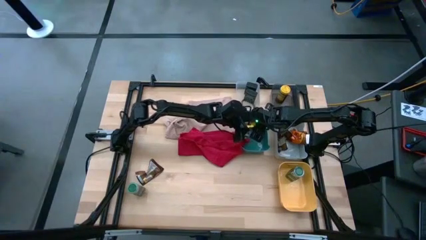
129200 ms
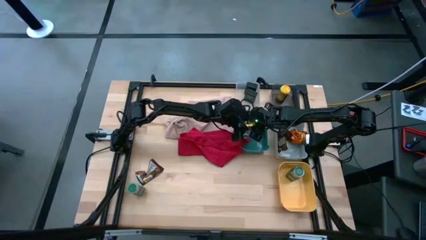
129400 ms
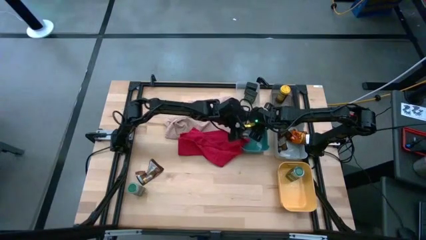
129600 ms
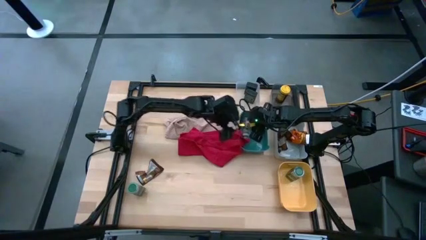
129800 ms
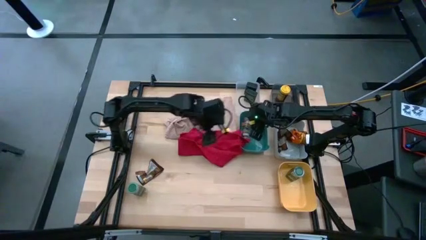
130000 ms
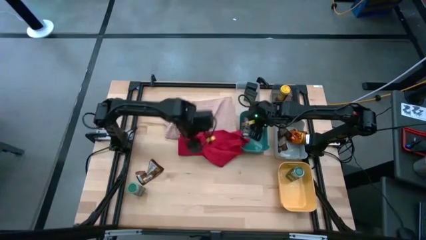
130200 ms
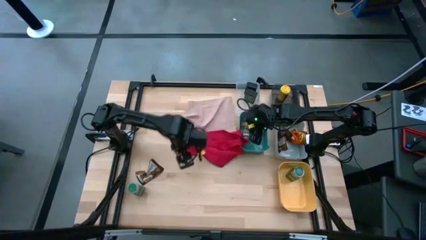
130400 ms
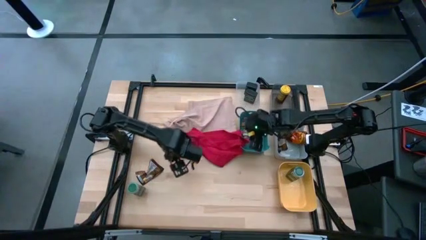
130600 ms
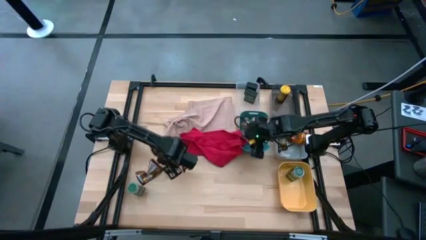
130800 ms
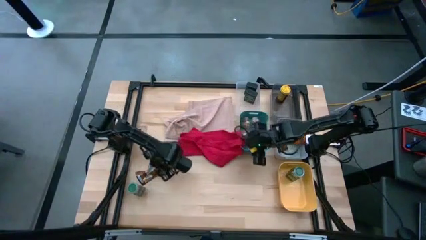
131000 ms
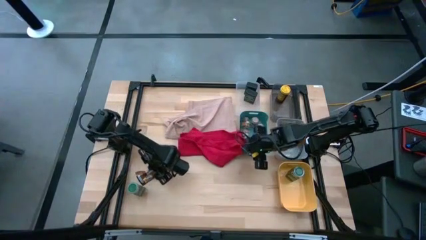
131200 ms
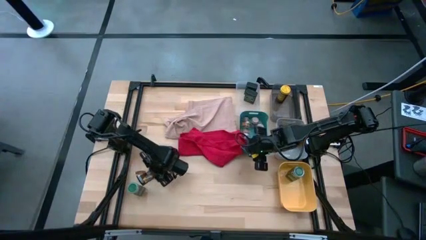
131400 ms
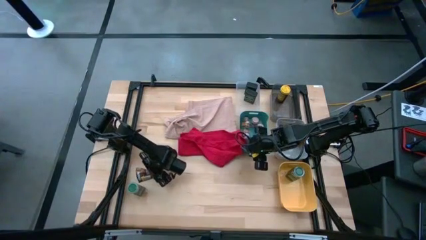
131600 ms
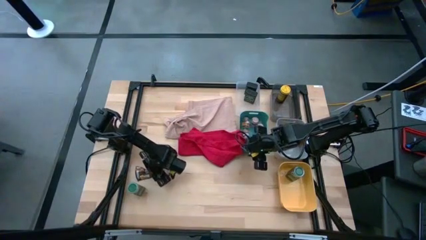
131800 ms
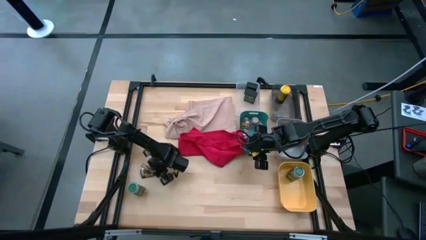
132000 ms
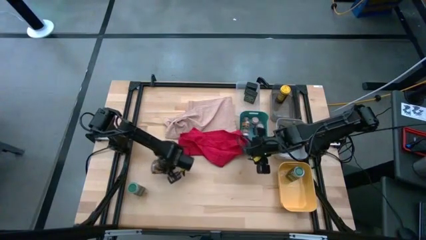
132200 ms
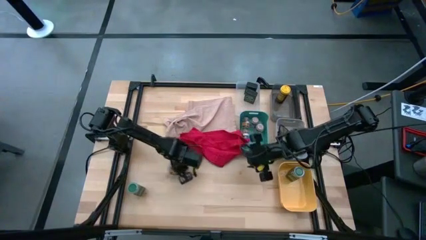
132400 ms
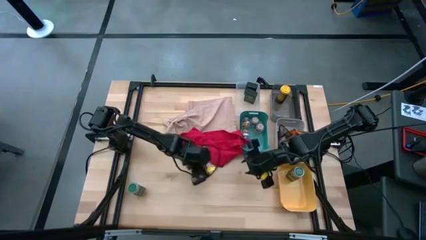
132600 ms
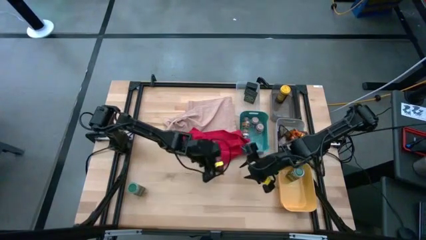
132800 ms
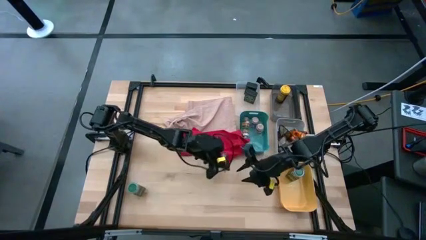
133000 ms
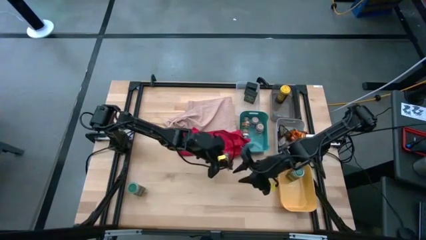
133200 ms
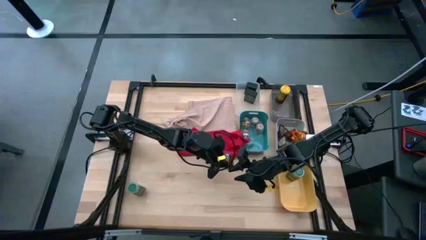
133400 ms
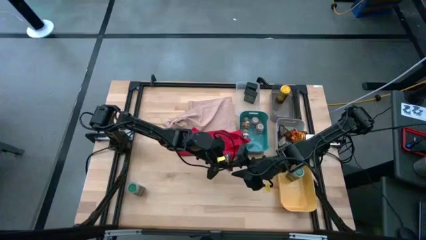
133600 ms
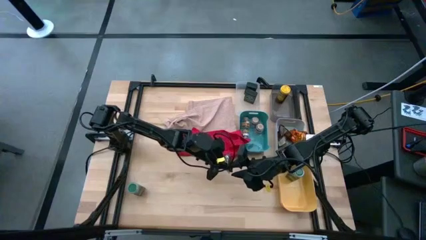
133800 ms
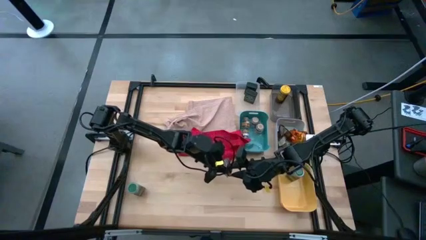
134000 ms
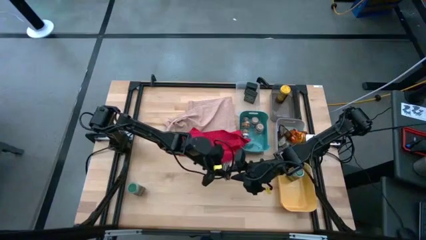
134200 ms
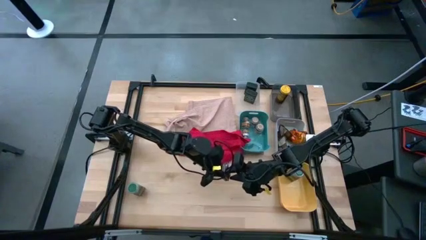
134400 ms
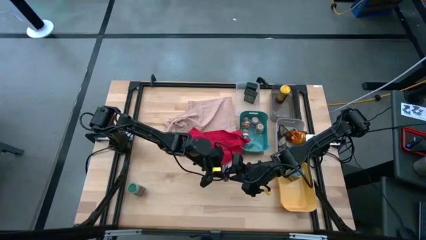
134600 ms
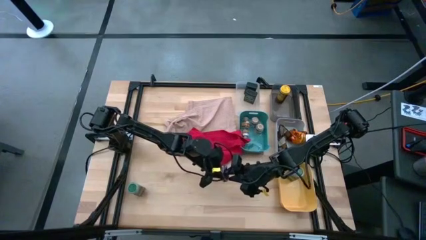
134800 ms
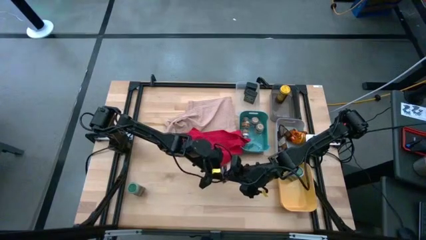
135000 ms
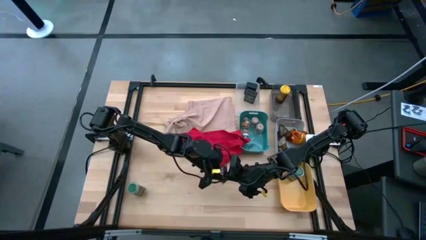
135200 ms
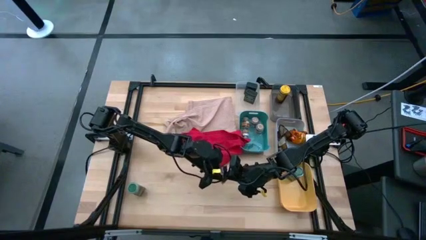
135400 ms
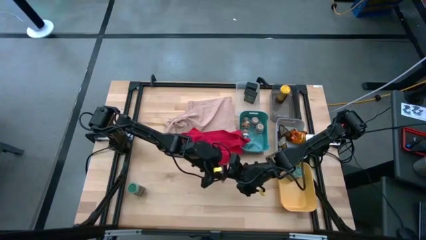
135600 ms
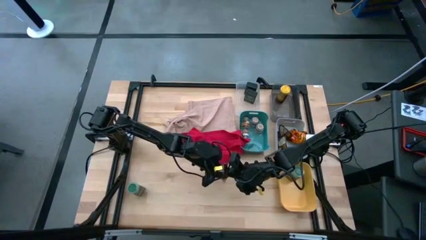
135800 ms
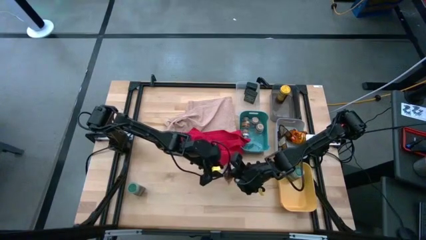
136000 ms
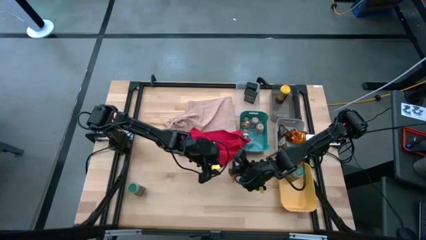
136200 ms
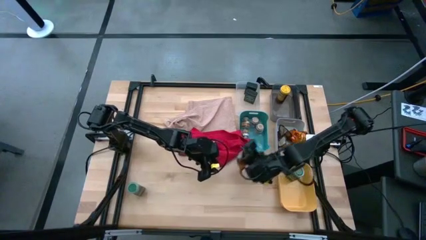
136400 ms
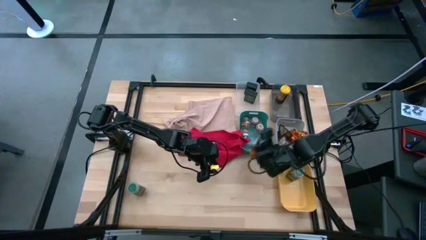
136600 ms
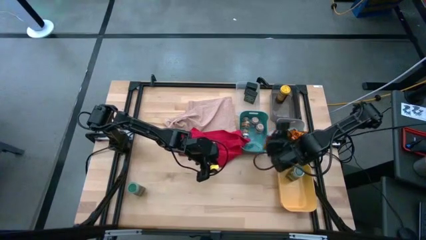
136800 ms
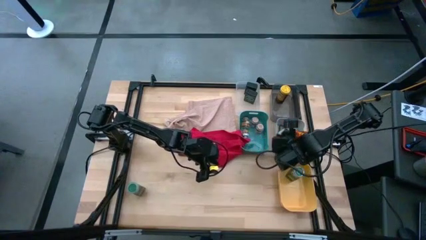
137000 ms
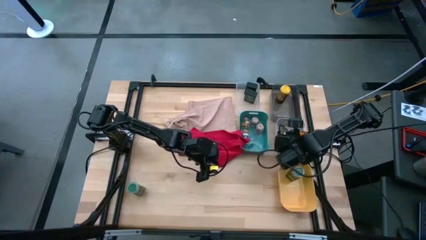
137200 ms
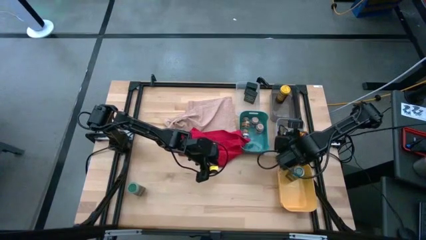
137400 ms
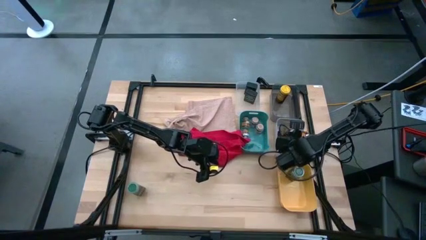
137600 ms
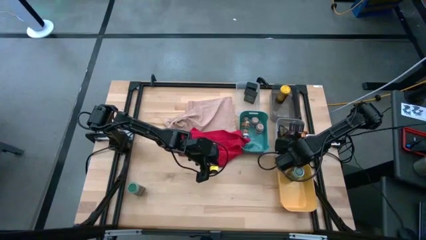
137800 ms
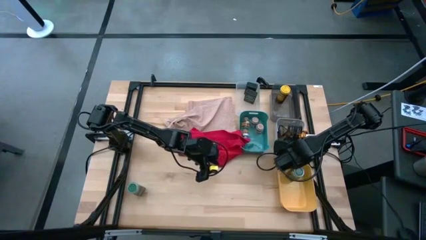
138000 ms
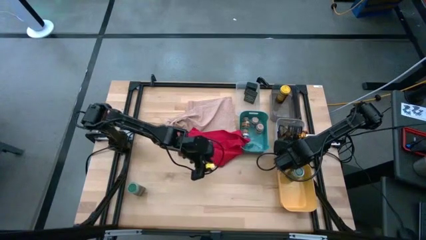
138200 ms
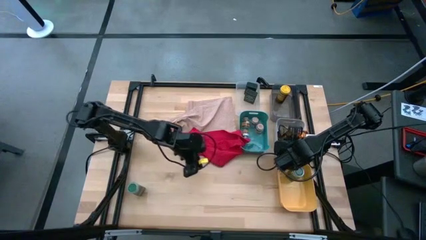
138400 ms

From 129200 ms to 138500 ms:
Task: Sort spices by type
Put the orange pouch seasoning into the light blue bin

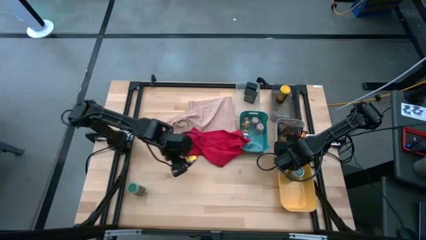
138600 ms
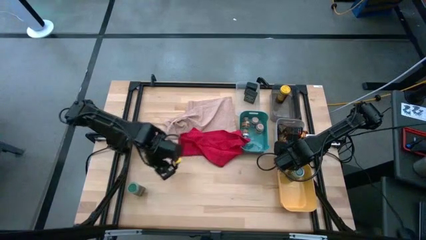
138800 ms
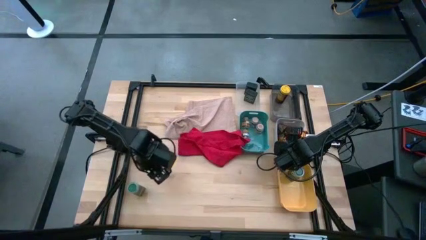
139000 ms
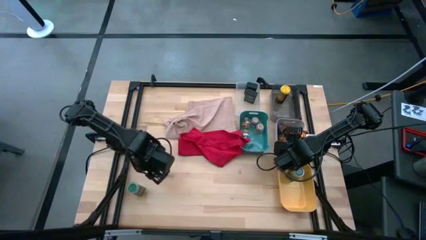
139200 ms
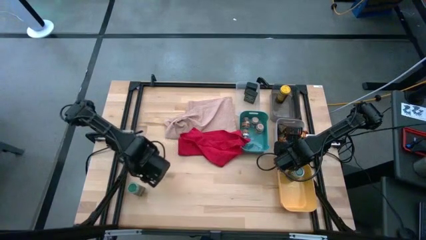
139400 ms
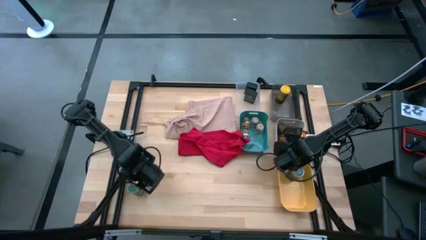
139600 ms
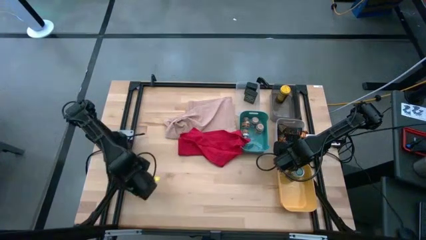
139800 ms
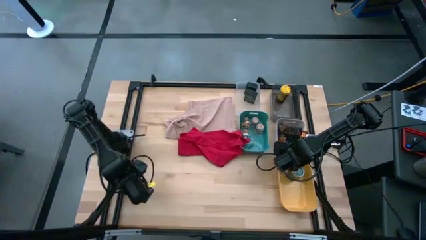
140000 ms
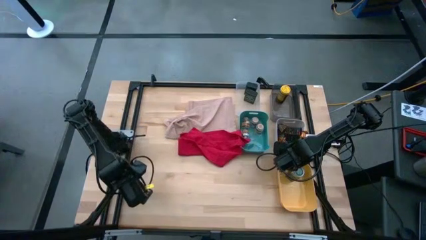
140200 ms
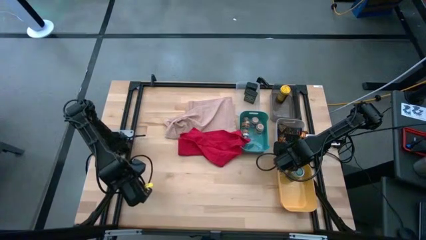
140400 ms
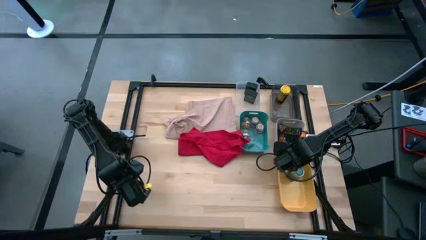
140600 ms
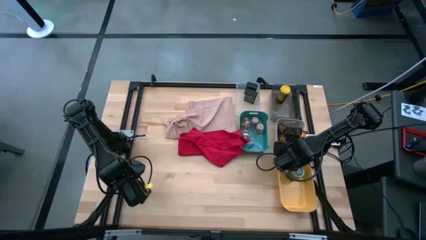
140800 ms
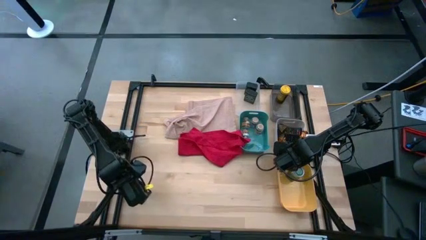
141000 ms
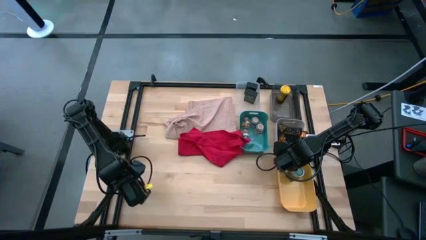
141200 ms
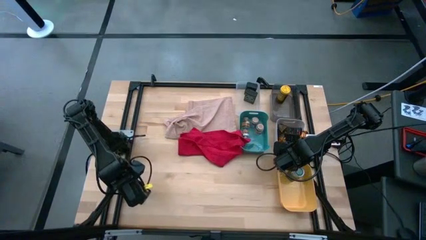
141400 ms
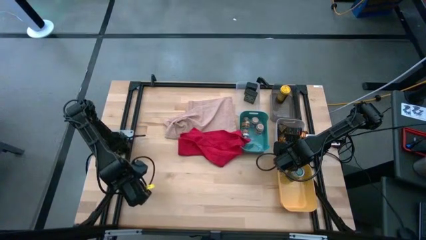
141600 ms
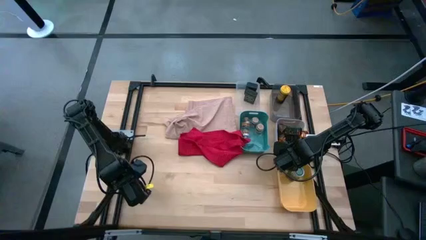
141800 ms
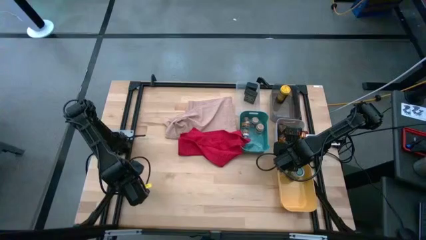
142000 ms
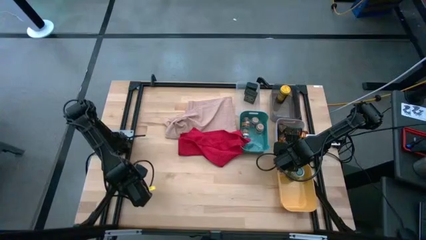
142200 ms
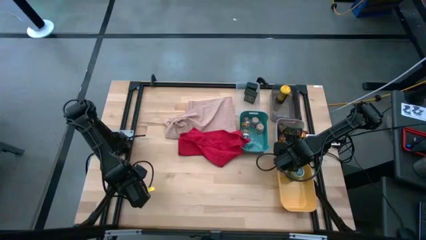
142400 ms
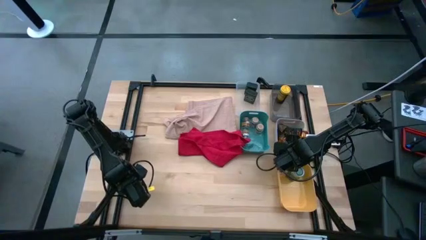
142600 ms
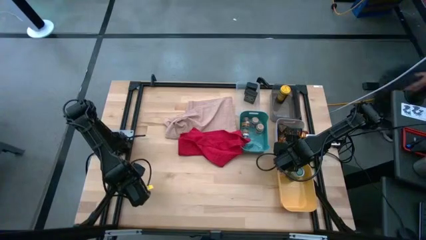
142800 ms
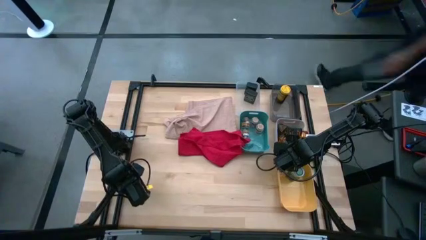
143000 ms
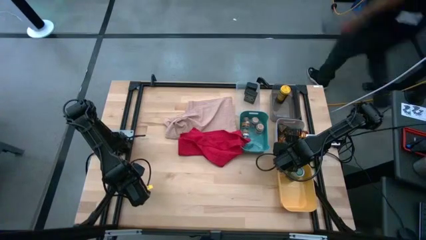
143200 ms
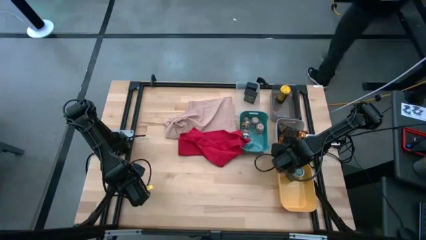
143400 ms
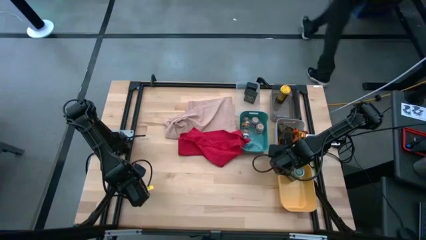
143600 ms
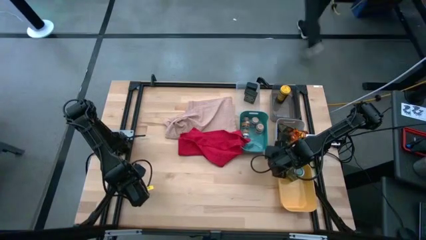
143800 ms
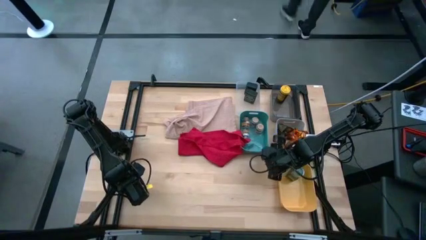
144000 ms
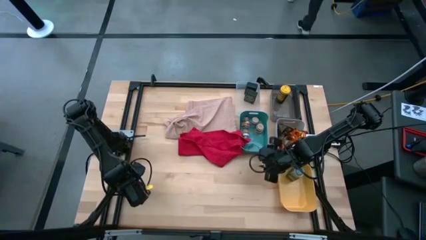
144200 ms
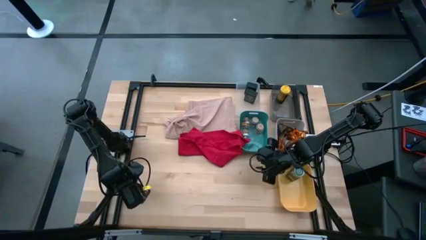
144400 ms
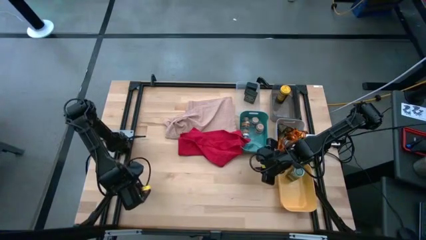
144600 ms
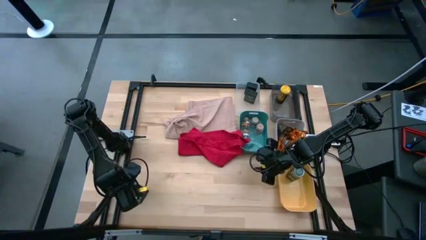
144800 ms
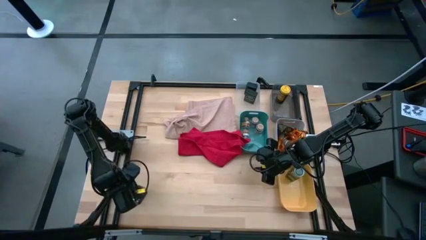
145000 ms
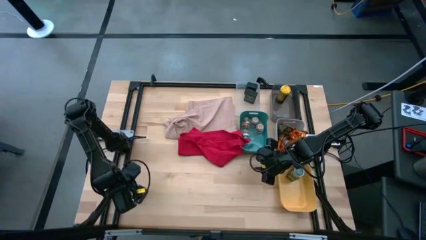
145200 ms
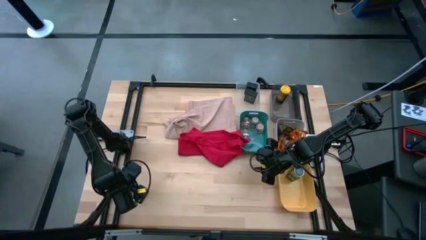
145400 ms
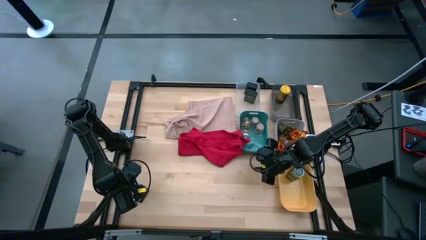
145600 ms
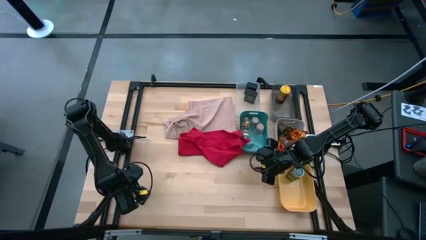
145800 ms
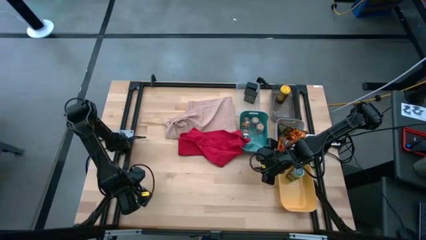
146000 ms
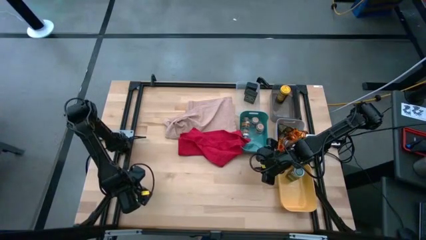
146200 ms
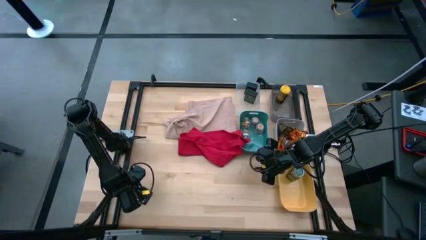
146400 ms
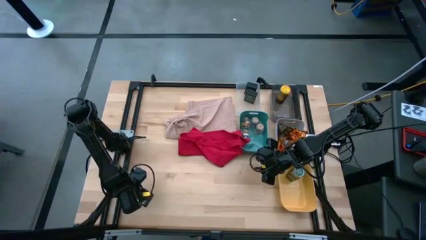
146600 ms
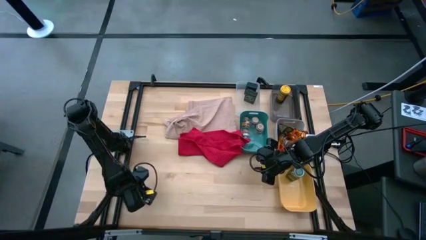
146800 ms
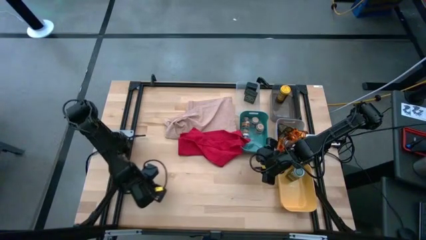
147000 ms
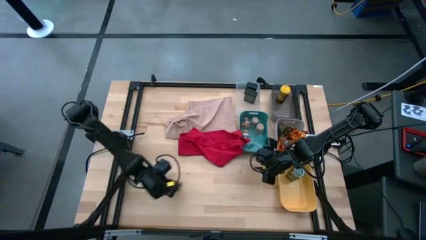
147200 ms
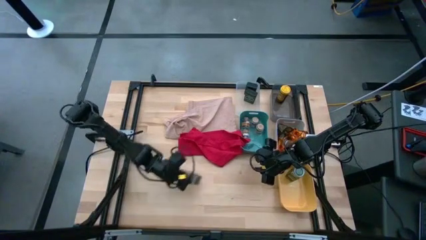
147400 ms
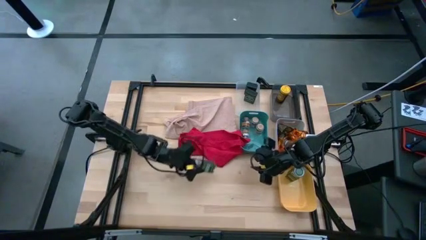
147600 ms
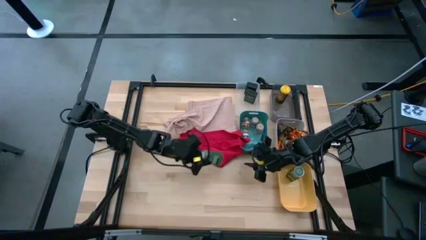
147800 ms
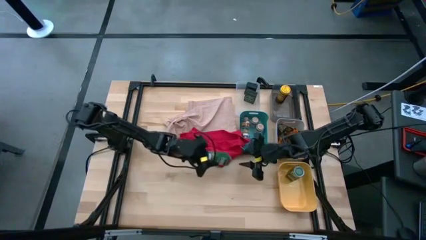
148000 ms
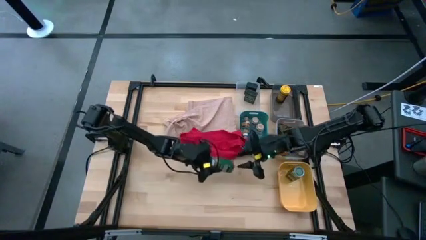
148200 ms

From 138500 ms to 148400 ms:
Put the dark green seasoning bottle into the light yellow bin
